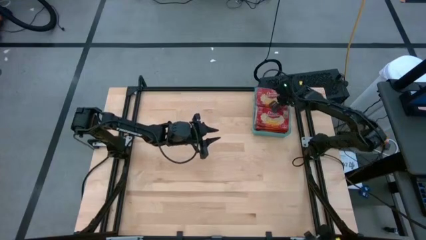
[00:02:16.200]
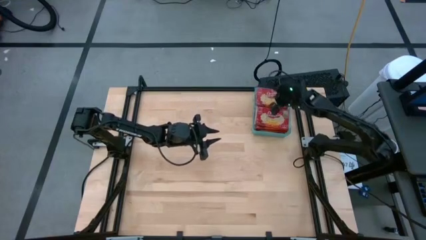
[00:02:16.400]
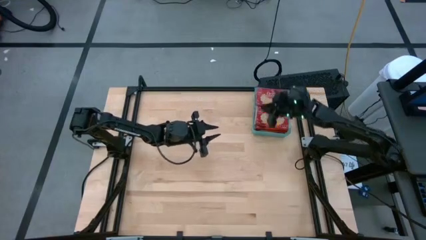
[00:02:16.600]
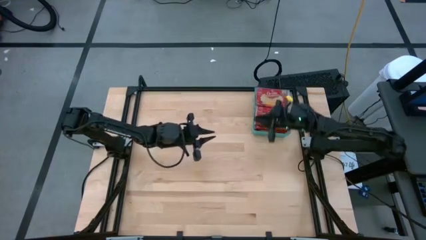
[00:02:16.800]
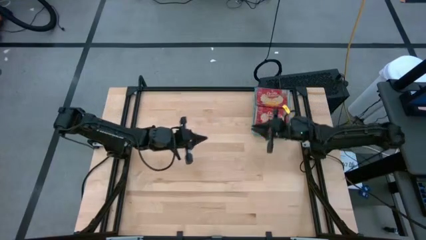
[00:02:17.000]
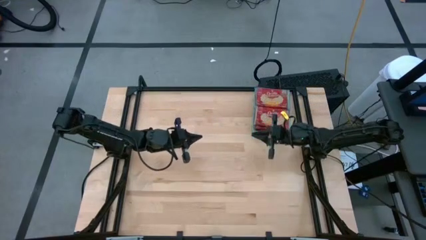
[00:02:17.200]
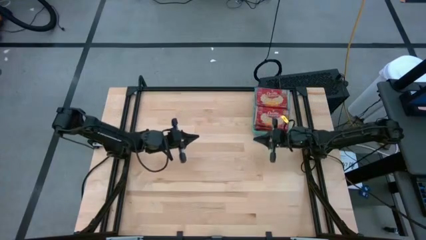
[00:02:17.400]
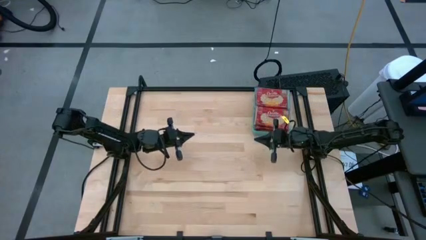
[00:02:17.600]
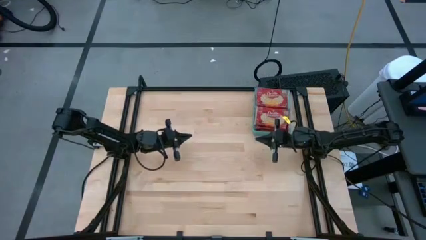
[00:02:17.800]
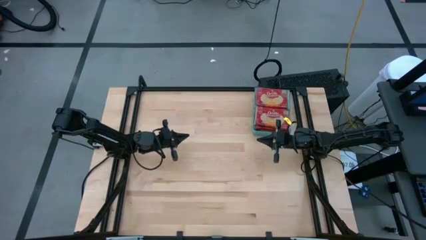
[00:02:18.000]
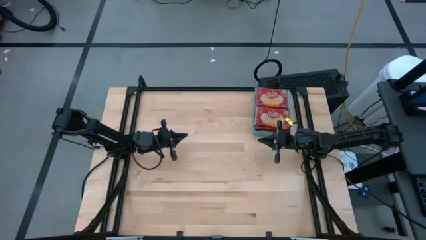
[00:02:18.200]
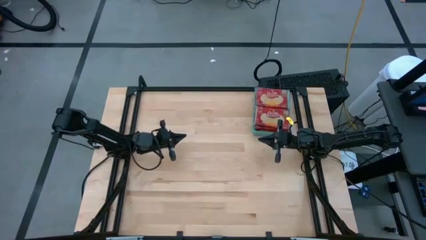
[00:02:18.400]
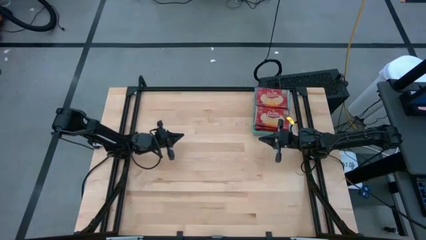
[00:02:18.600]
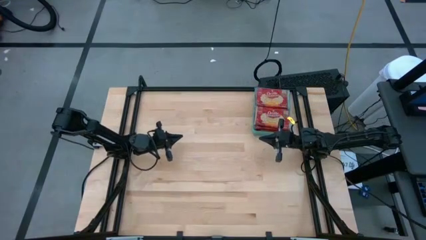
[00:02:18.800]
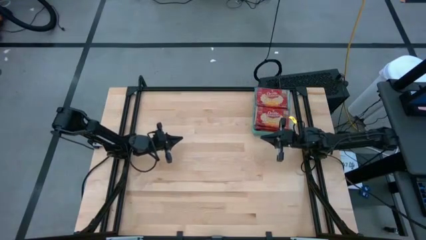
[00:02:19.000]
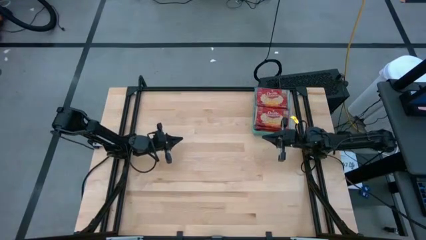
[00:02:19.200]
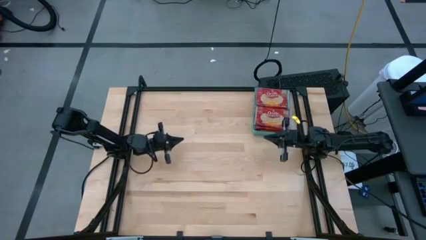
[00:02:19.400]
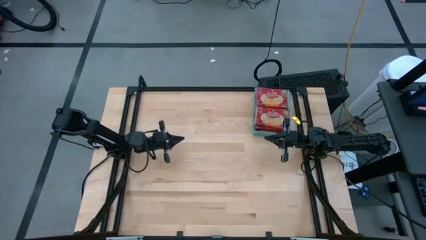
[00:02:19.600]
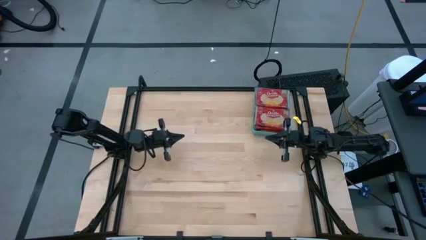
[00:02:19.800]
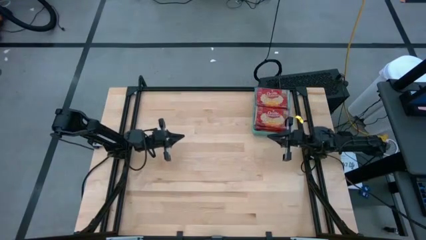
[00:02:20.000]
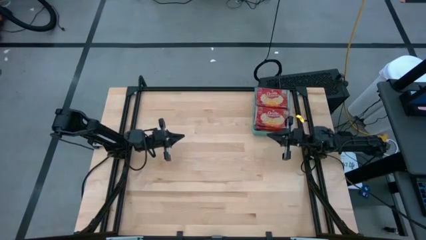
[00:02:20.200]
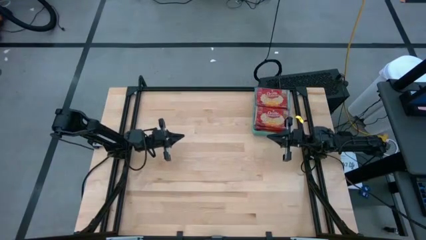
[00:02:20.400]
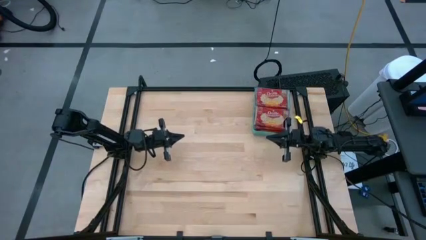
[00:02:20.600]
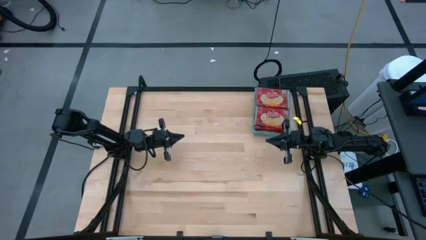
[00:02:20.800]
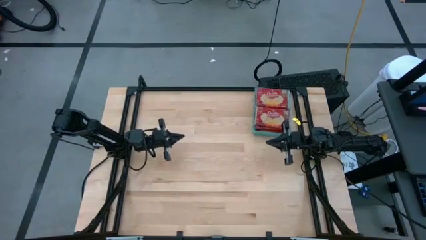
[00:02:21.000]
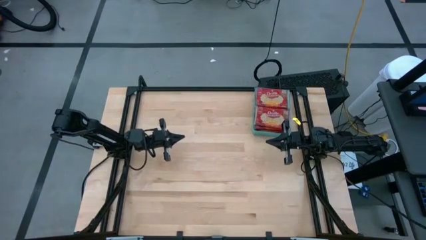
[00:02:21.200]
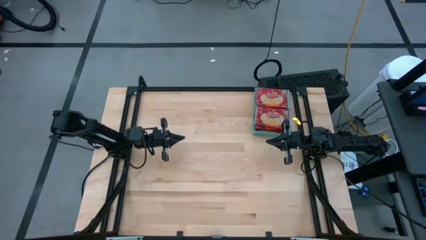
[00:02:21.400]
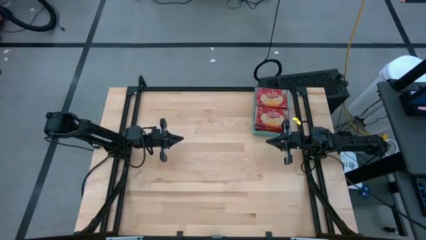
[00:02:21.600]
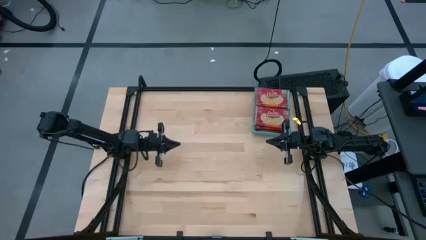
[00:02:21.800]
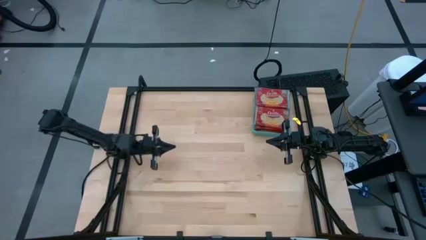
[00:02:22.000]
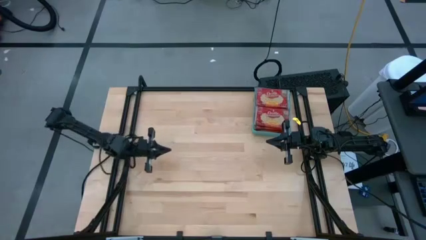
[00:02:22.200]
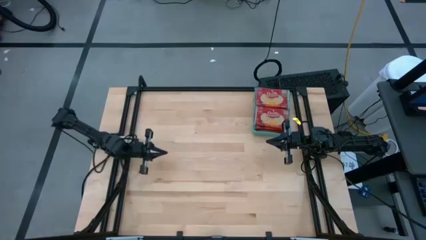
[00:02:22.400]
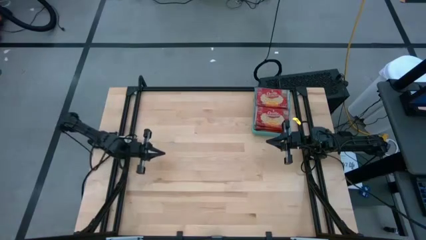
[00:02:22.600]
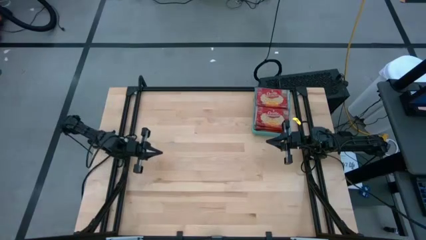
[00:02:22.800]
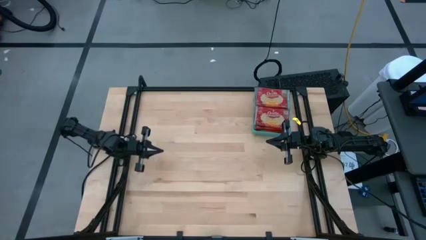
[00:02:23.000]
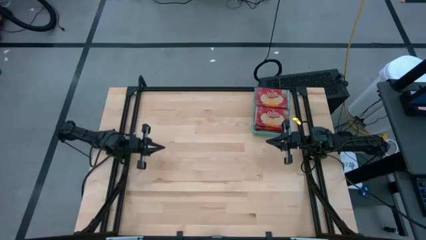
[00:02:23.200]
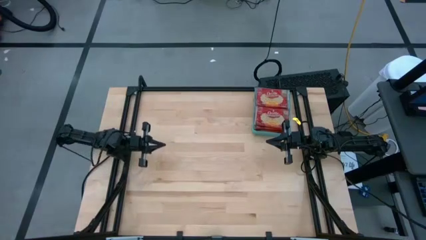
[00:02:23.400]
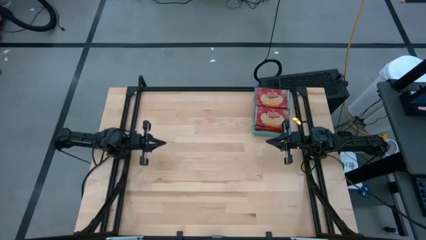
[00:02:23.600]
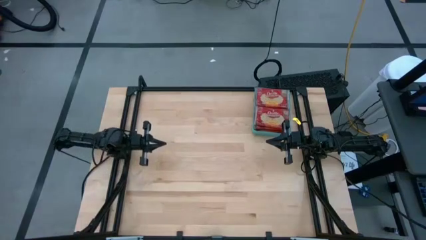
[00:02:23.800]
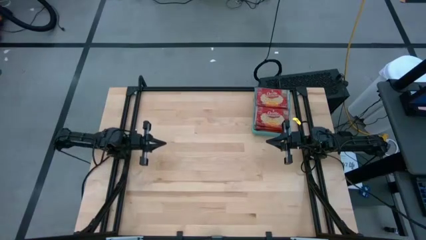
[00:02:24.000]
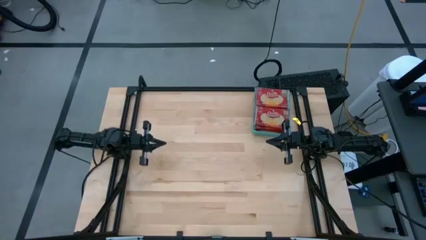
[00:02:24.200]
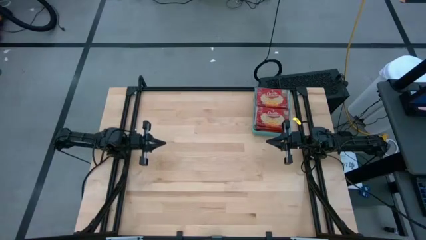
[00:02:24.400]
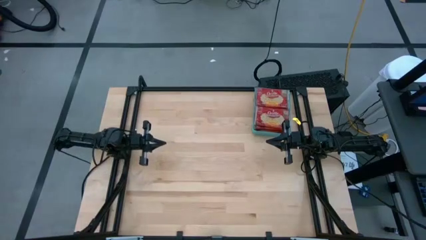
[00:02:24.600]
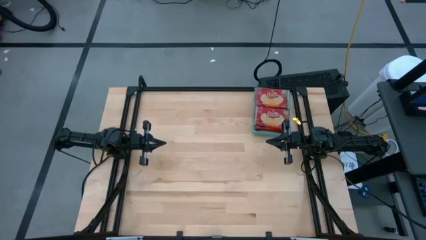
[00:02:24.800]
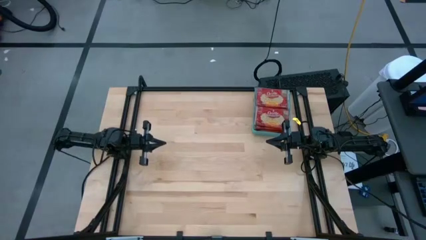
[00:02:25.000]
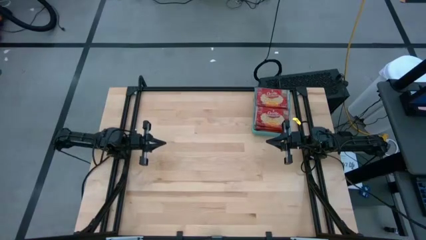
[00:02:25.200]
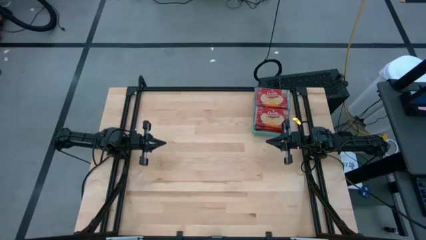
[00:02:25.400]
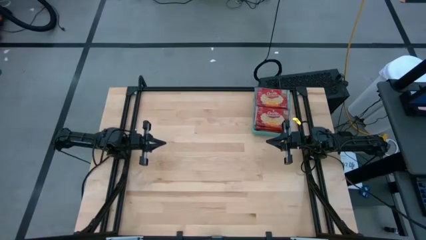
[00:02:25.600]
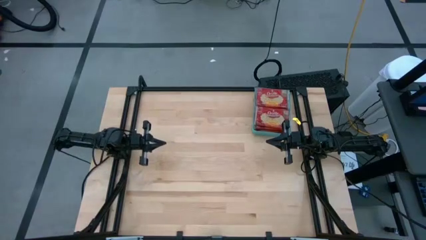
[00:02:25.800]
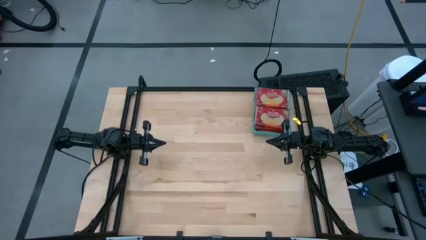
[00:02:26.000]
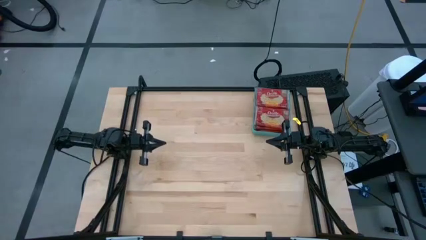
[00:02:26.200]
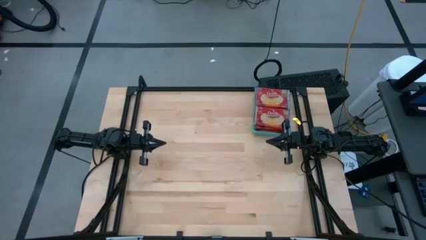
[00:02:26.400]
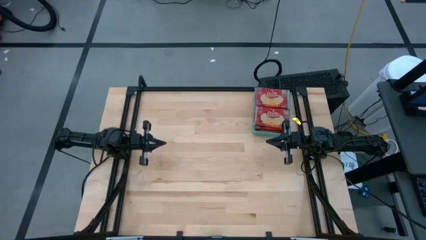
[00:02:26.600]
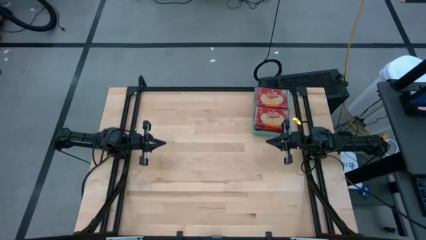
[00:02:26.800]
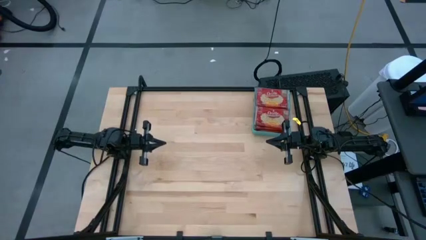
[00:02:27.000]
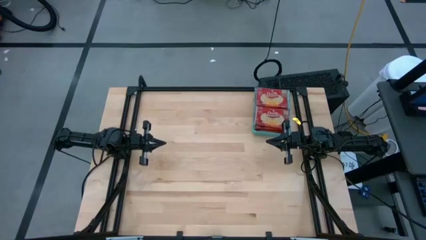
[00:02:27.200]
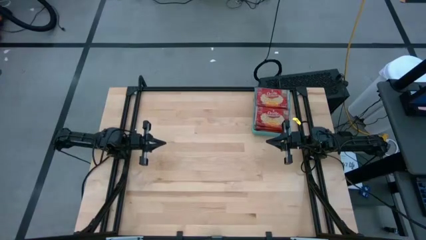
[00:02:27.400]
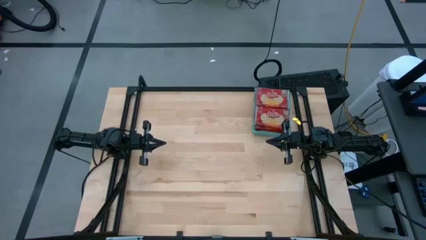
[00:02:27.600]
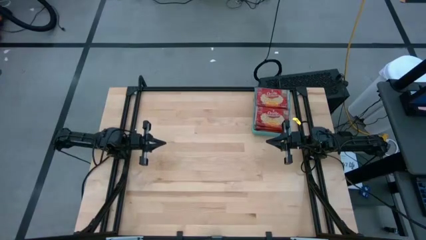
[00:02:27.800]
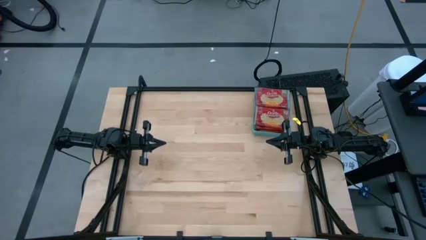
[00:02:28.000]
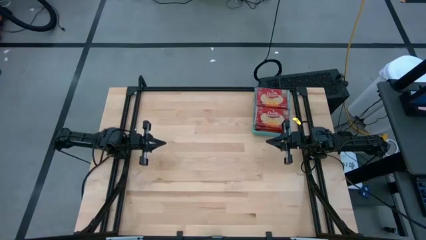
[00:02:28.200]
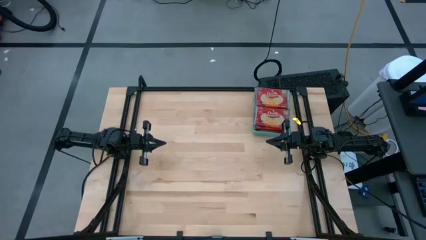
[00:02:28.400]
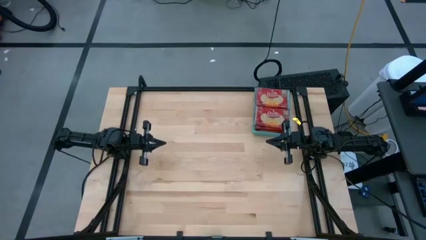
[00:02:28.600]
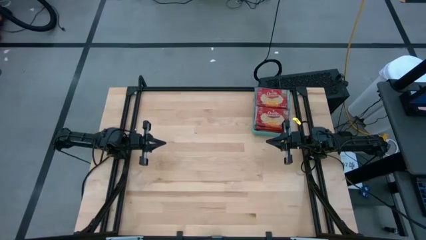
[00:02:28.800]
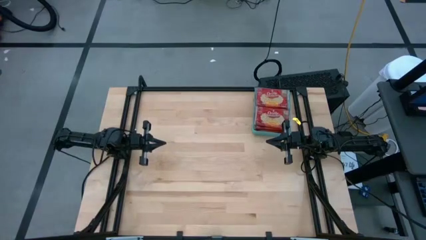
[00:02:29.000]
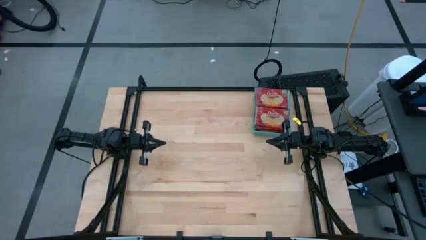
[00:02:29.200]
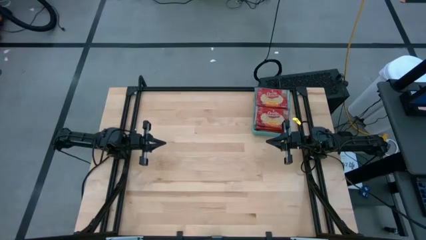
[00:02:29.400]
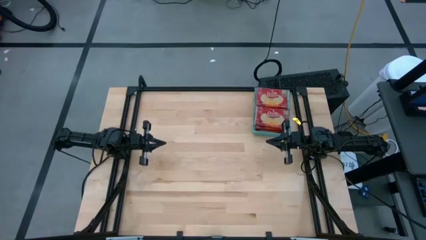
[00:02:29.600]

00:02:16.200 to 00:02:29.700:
Task: Sort popcorn bags into baskets
Return to Home Position

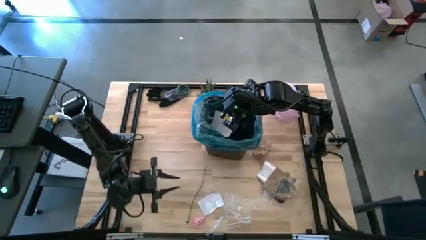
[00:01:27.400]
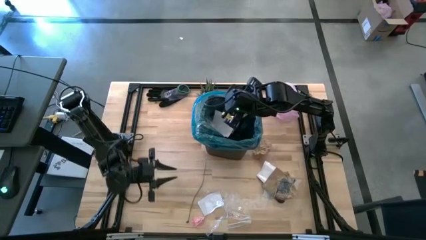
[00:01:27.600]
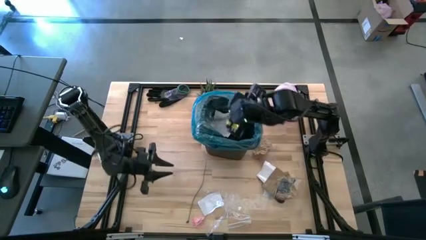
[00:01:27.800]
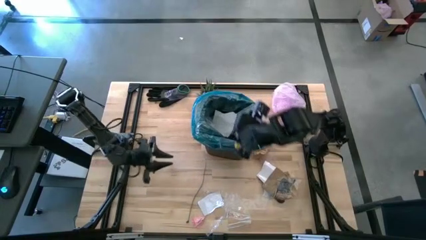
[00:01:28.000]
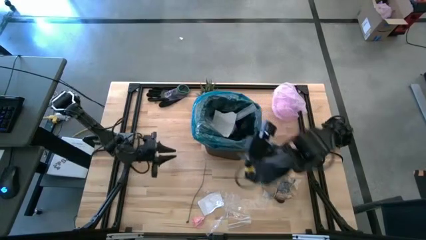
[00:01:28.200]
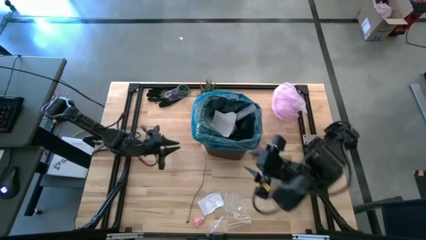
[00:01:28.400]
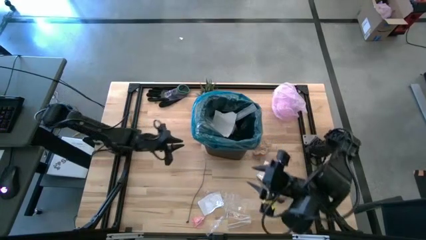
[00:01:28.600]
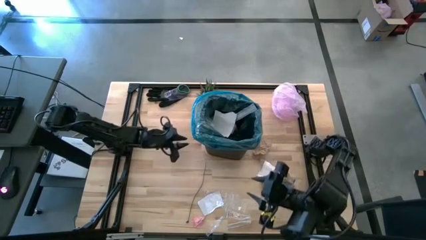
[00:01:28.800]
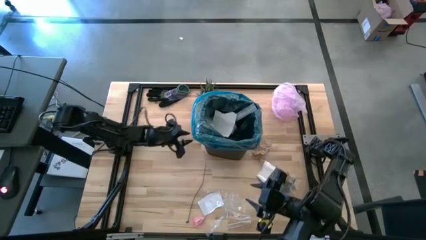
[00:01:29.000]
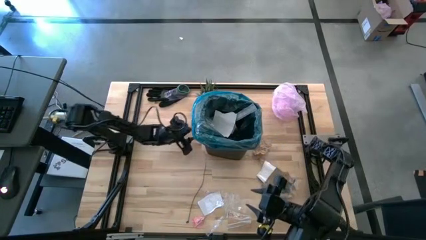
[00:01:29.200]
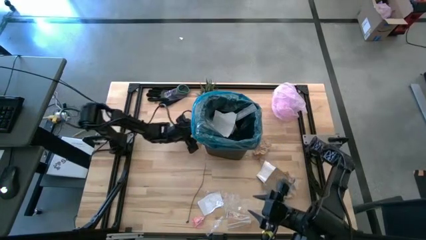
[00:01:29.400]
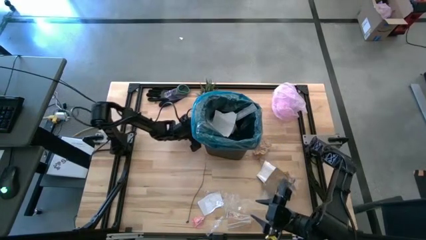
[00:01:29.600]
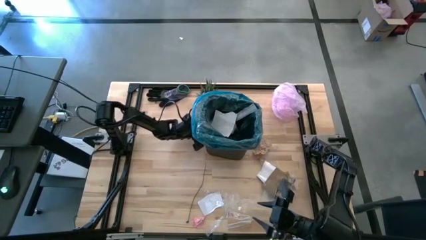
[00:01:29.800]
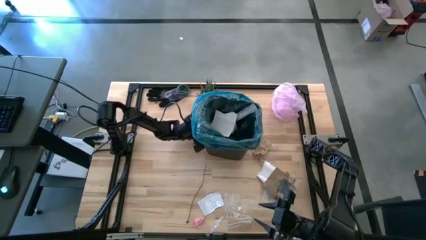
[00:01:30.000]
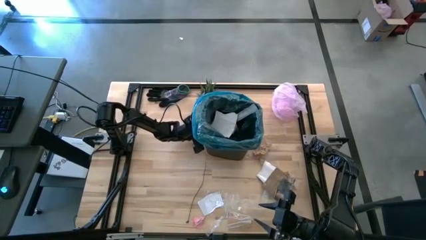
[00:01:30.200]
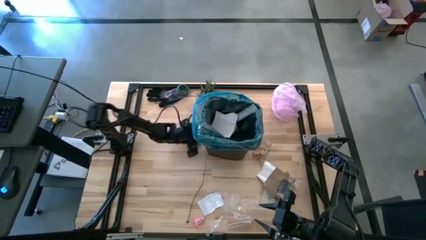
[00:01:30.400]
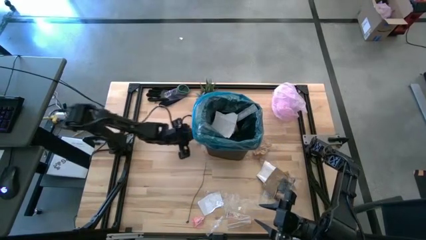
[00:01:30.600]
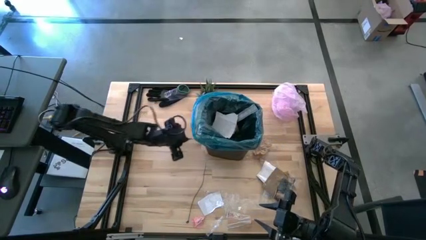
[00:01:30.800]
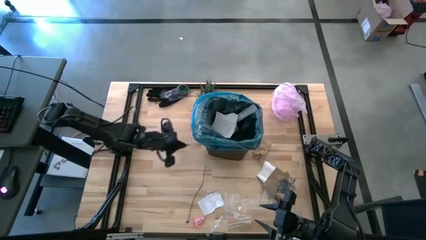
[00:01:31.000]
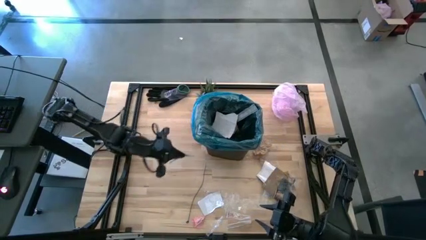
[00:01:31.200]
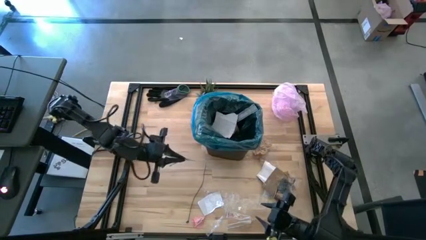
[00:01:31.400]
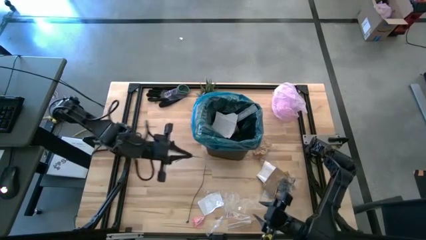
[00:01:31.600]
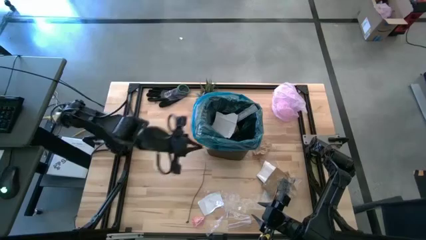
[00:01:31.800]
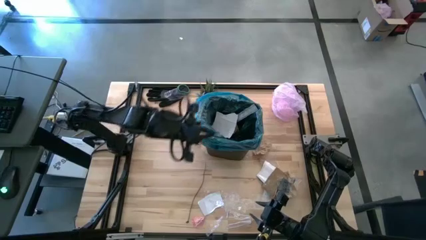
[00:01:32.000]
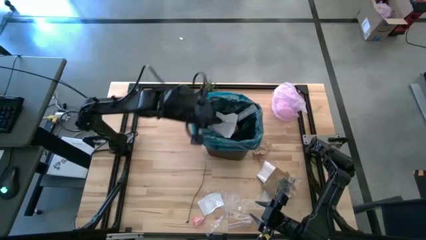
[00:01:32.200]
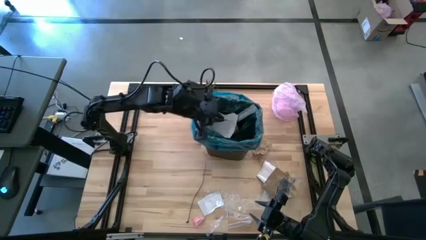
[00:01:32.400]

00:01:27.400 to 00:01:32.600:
Task: place trash/remove bag and relplace
Put the cable wires into the trash bin
